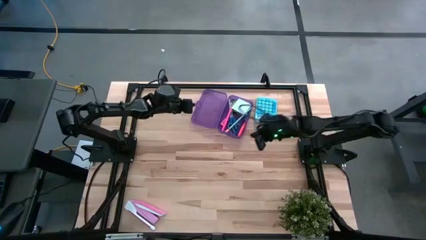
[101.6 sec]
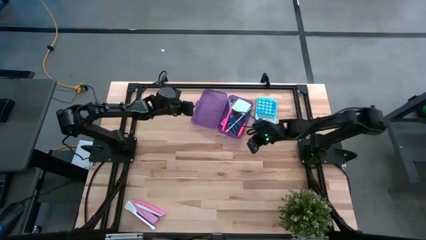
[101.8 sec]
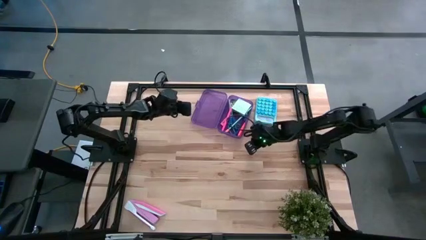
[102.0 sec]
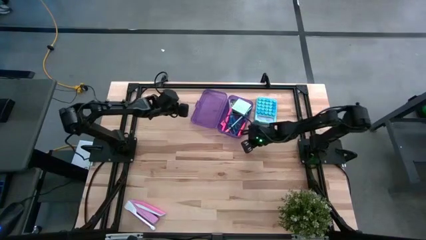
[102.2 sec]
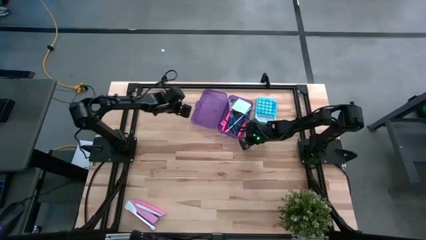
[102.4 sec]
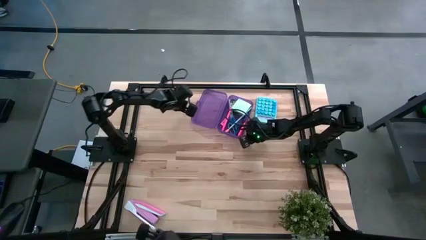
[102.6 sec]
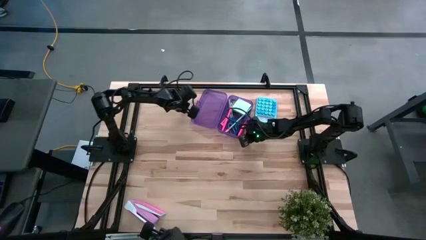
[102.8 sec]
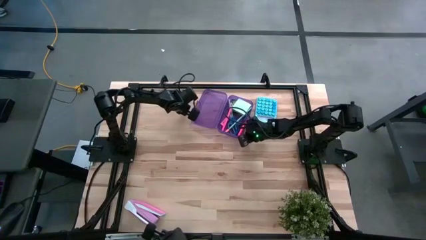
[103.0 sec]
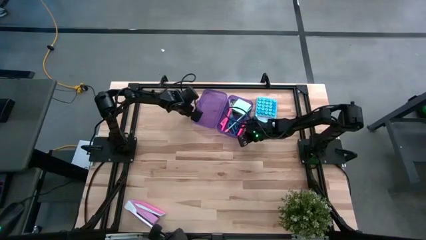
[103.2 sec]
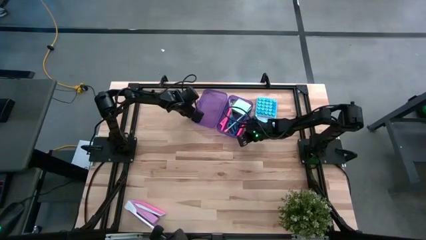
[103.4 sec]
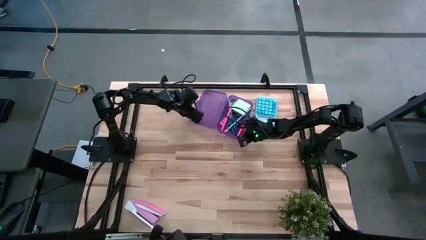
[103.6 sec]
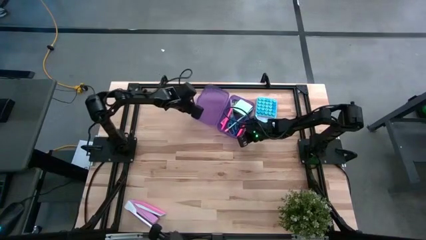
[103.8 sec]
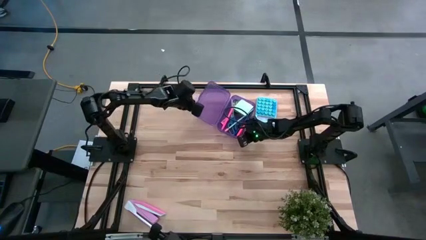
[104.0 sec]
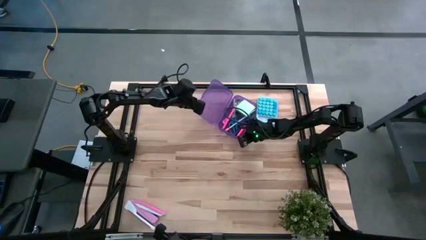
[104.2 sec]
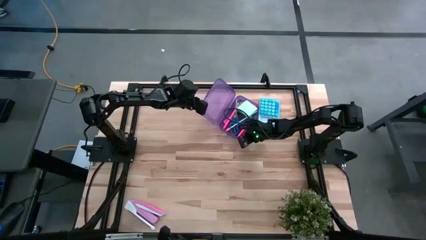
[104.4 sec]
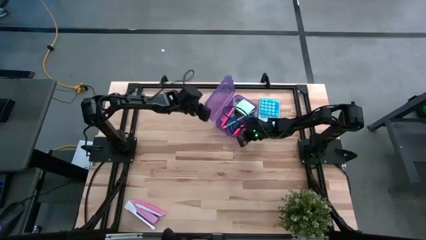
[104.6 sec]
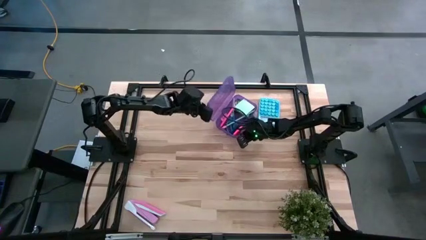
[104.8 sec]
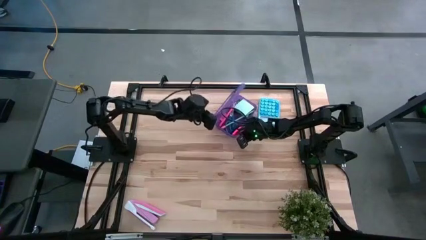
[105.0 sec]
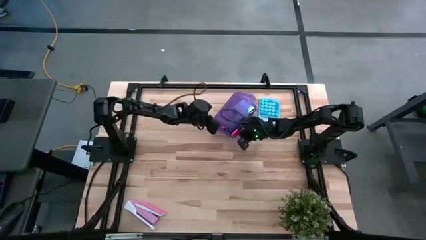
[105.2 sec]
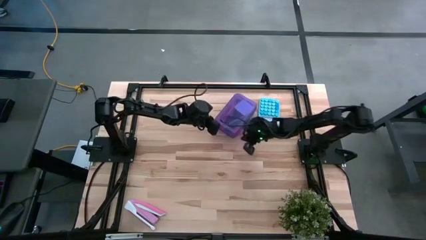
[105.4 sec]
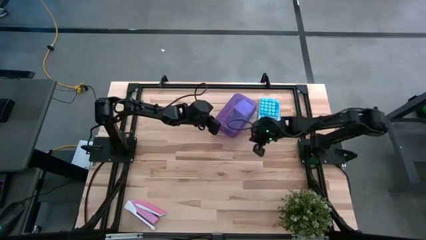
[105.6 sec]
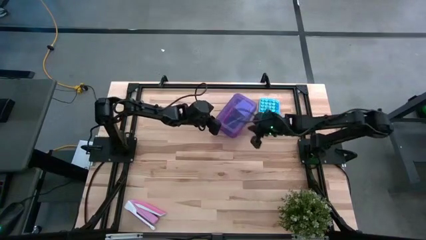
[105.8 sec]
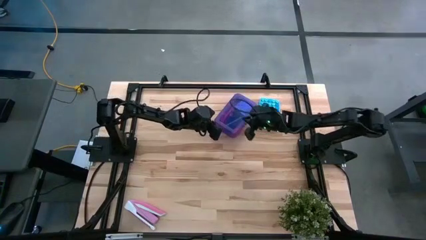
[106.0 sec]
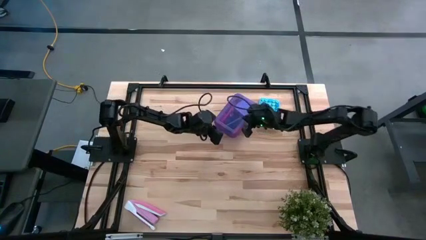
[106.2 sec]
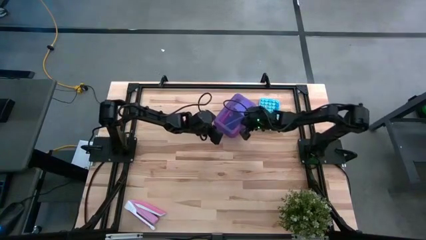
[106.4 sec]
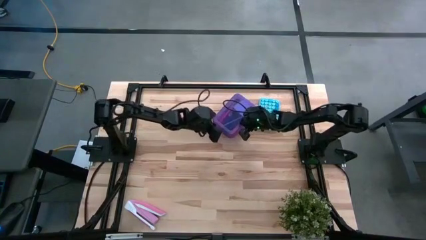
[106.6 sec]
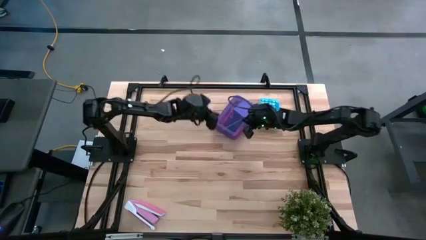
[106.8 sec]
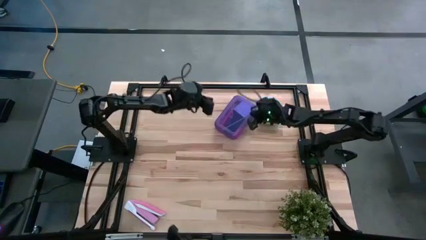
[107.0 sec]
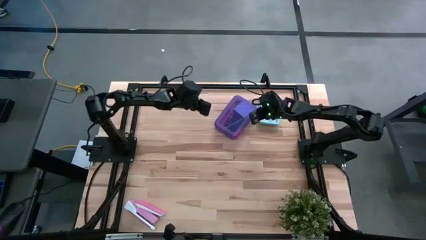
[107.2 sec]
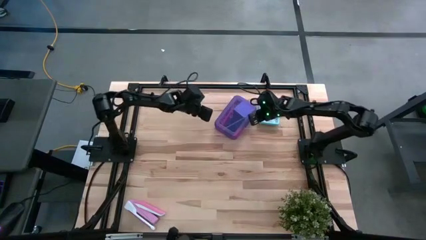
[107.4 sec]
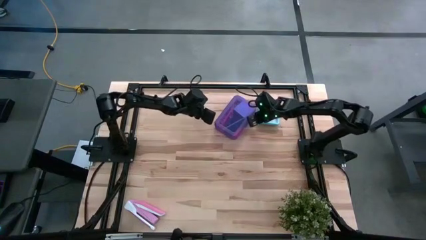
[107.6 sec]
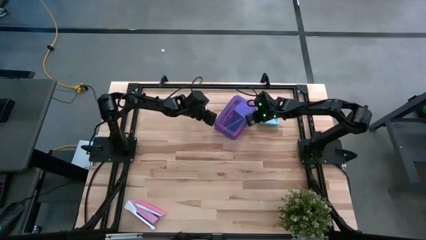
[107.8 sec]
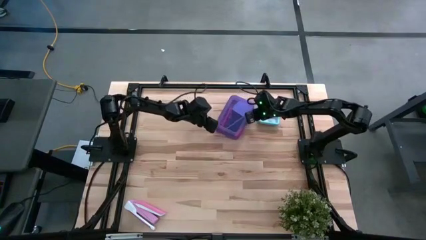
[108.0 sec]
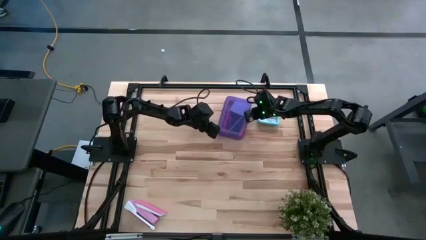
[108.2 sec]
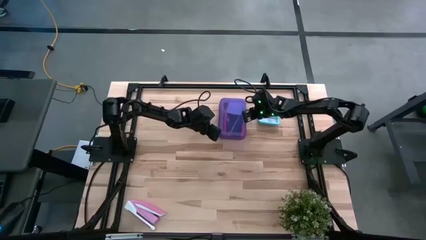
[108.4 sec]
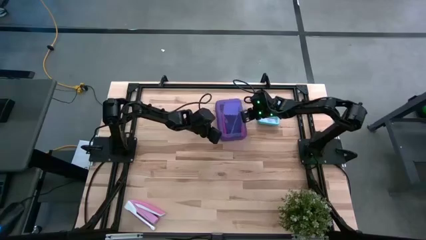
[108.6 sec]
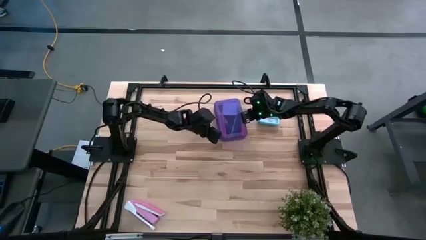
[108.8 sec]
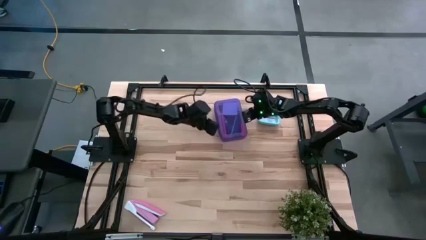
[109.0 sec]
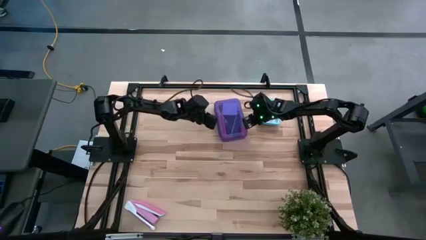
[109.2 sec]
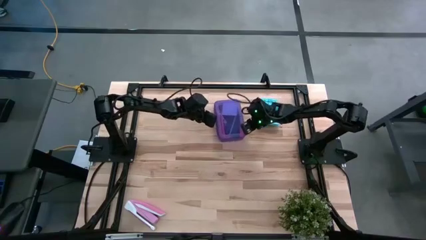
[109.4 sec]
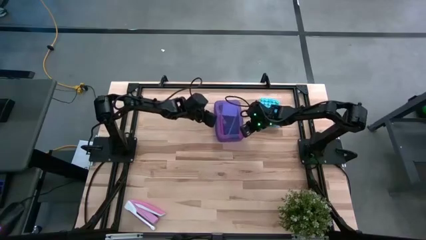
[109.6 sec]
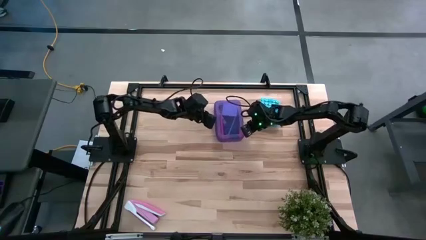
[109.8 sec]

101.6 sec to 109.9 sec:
Task: Pack school essentials
Close the purple supply box

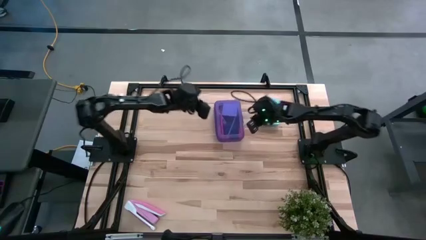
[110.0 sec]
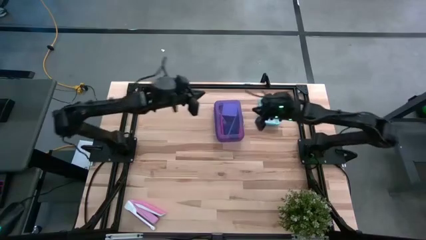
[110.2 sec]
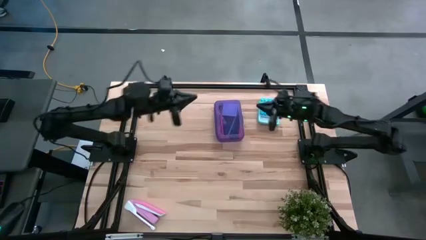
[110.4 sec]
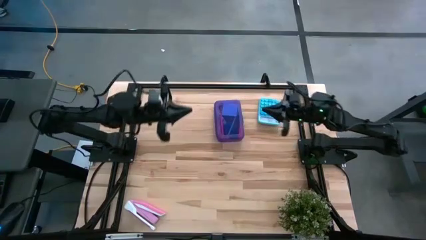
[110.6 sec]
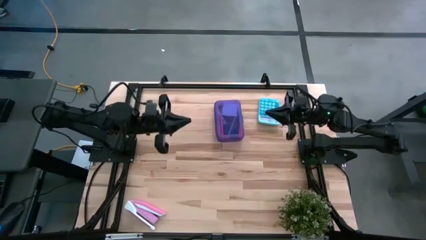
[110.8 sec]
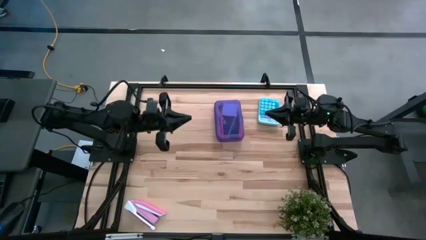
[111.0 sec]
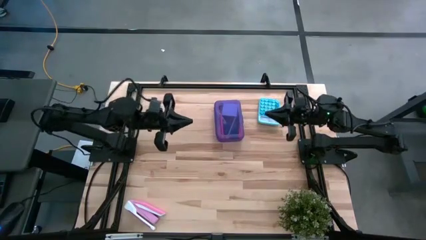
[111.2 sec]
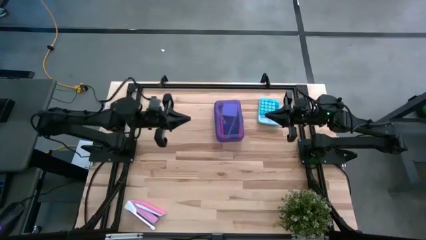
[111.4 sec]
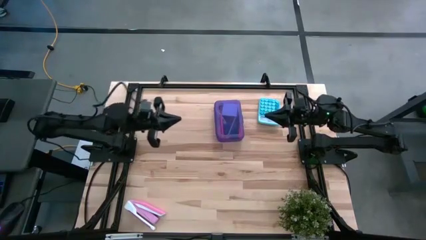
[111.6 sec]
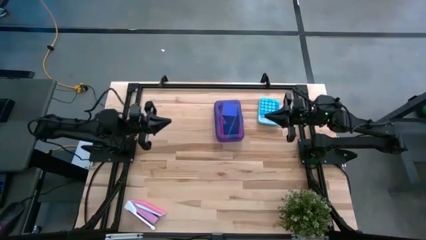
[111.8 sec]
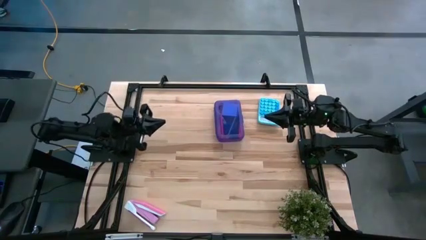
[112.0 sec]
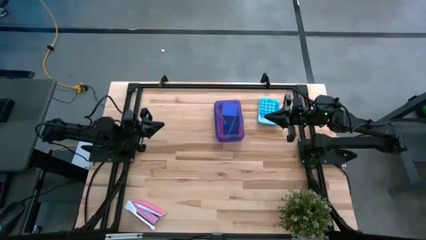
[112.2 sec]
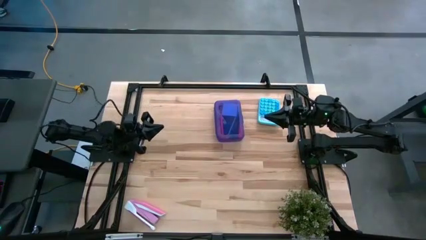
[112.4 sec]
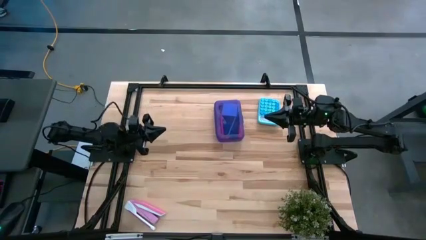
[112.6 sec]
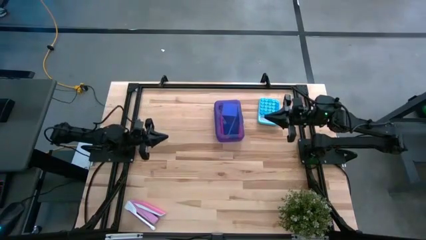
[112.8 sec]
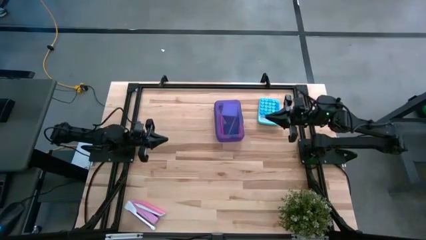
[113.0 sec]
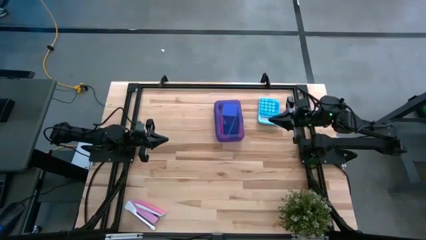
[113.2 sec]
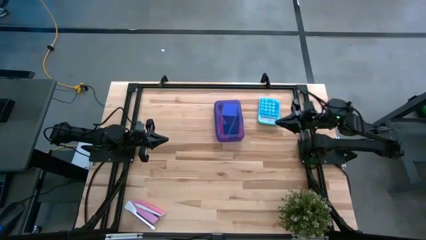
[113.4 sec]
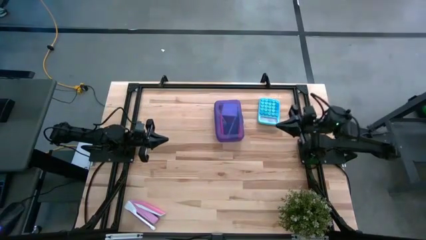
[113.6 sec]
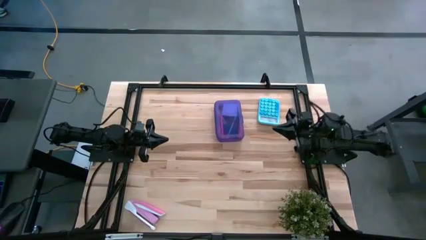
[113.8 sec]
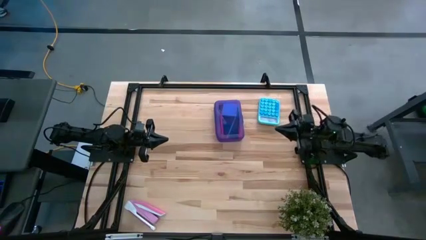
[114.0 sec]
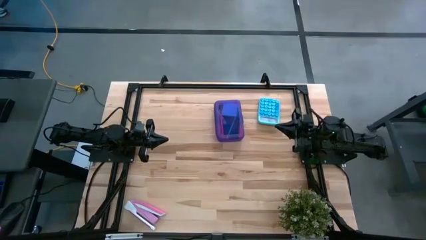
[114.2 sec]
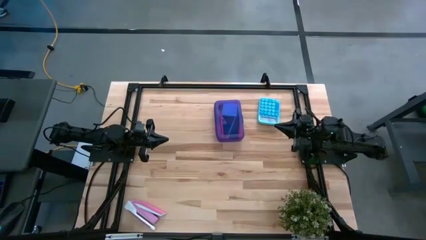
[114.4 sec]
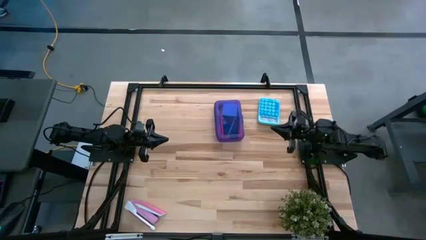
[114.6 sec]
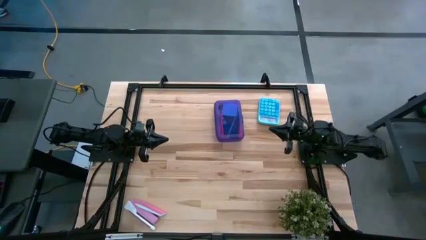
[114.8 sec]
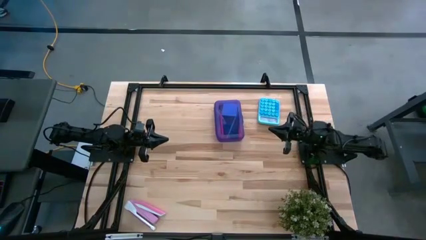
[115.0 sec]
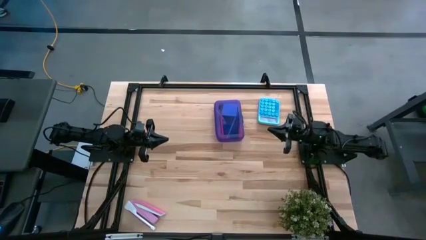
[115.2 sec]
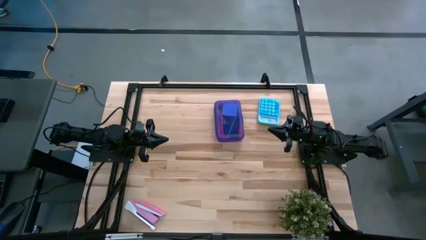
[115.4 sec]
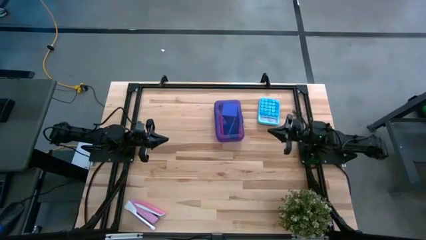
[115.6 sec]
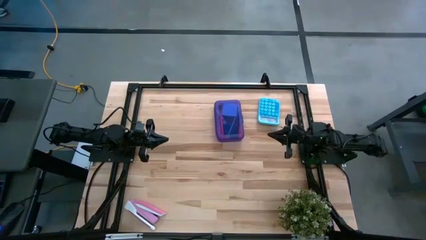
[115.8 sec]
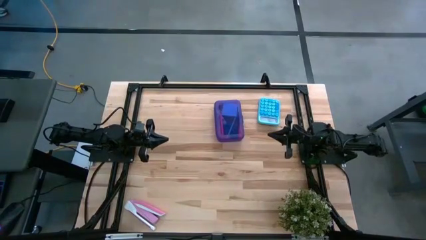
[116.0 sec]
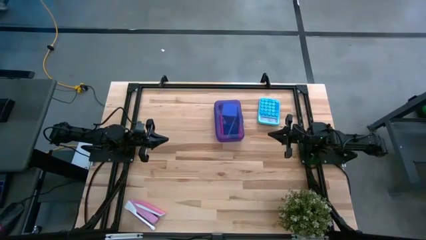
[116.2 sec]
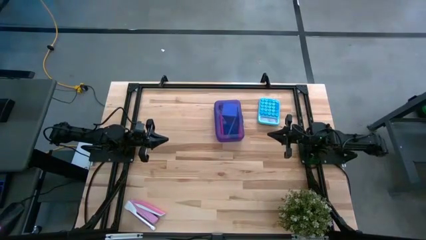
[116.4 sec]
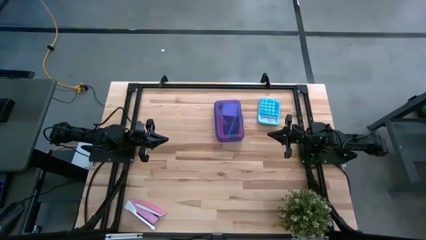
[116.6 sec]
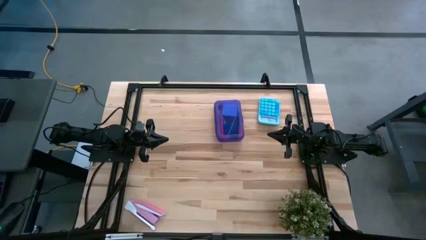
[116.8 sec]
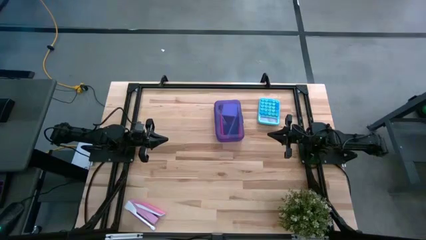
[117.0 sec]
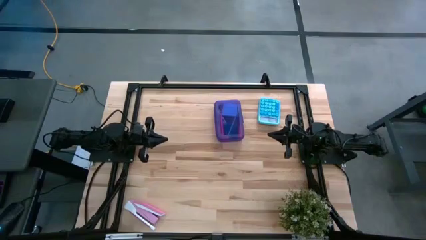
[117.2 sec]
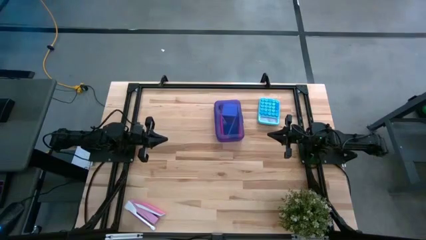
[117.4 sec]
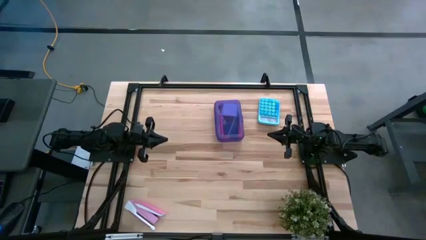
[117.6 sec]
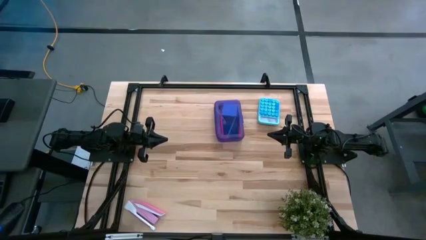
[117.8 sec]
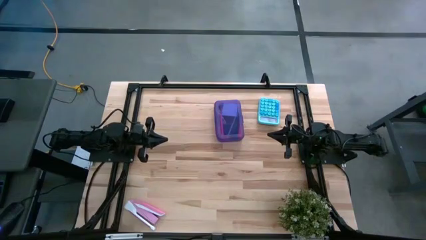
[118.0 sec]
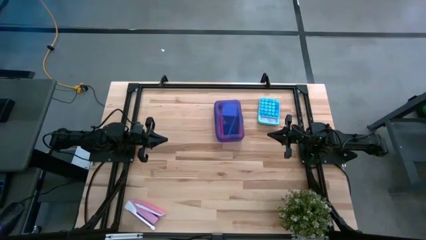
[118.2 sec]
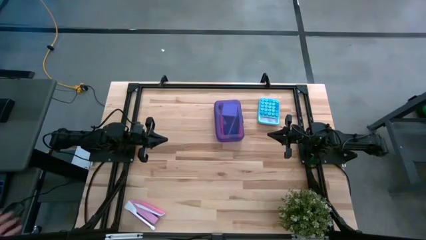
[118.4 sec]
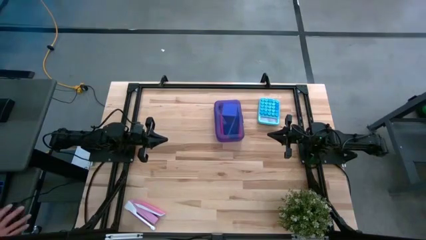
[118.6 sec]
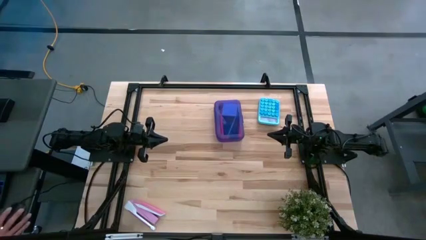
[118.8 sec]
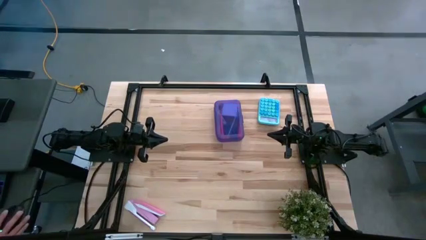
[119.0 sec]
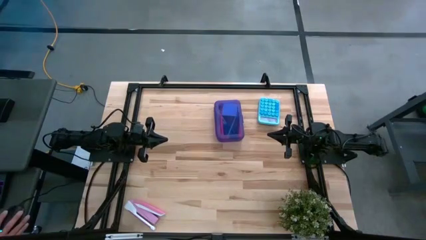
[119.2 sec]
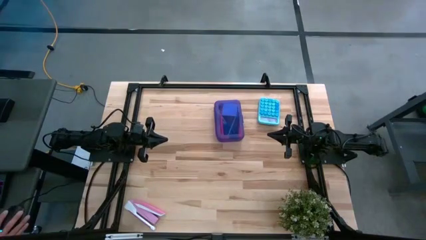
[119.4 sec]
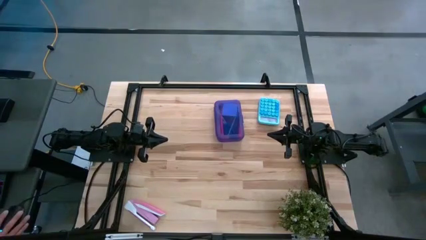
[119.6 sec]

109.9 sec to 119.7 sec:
Return to Home Position
